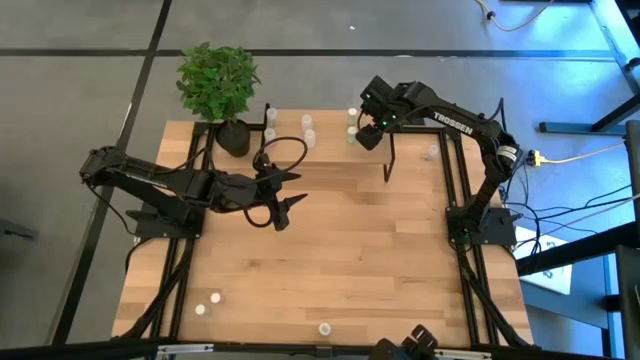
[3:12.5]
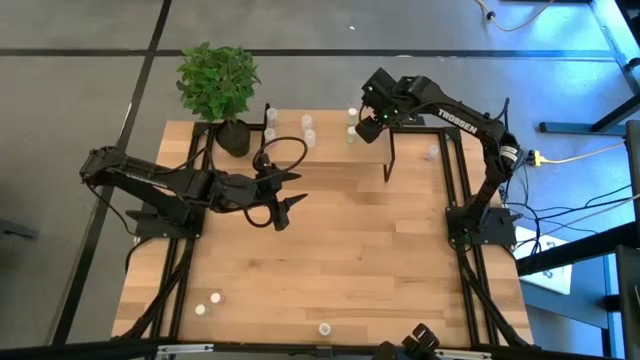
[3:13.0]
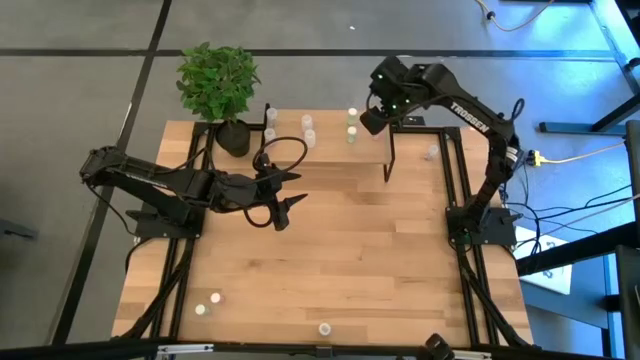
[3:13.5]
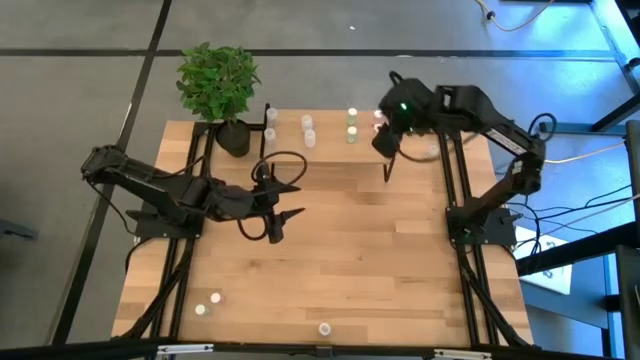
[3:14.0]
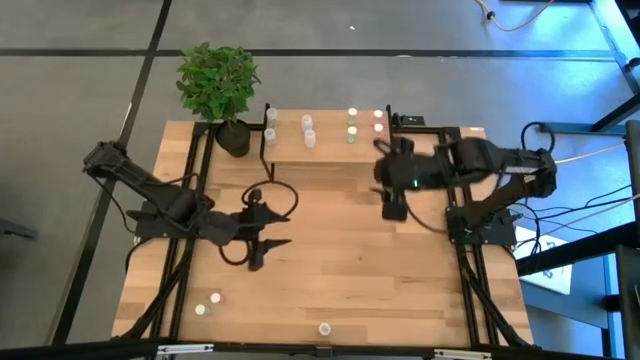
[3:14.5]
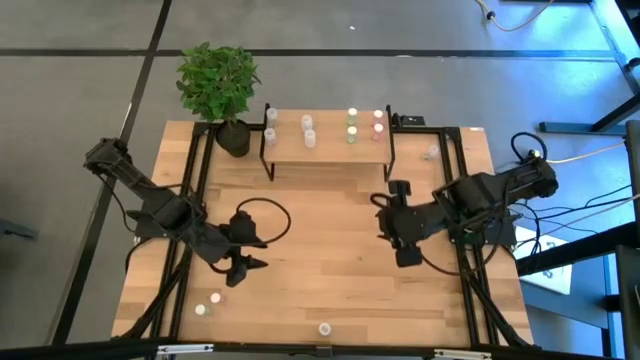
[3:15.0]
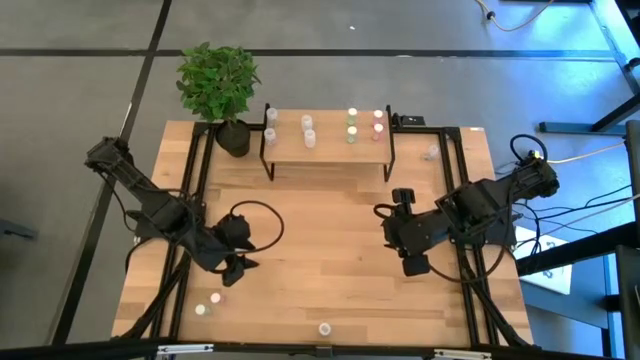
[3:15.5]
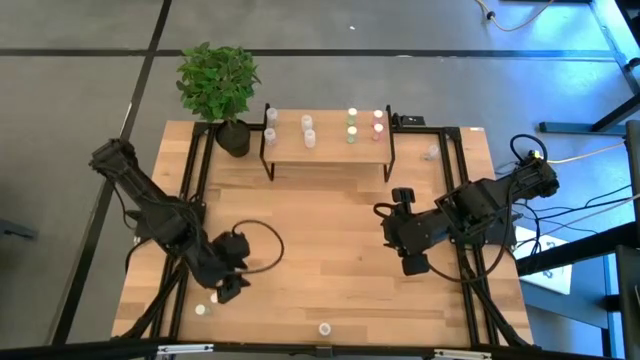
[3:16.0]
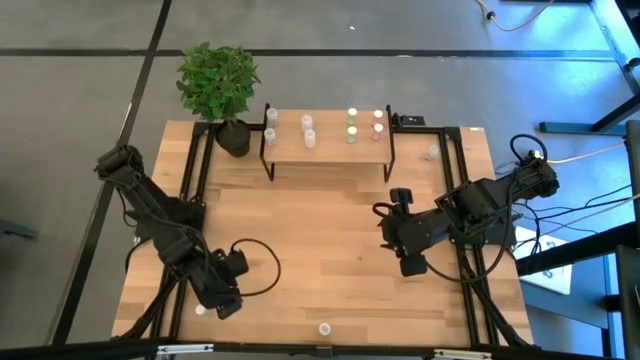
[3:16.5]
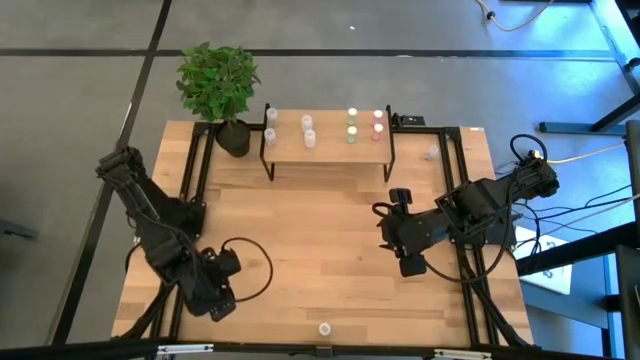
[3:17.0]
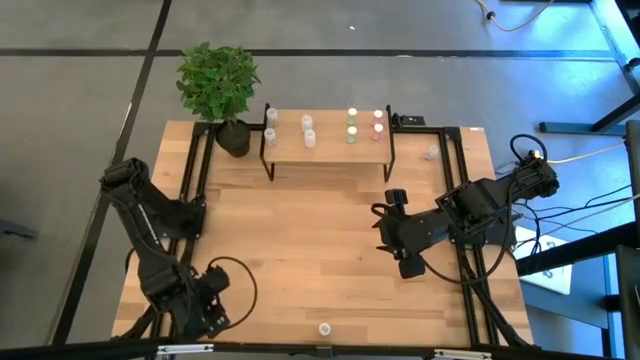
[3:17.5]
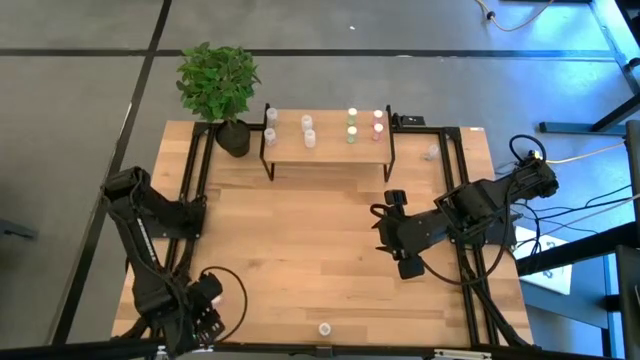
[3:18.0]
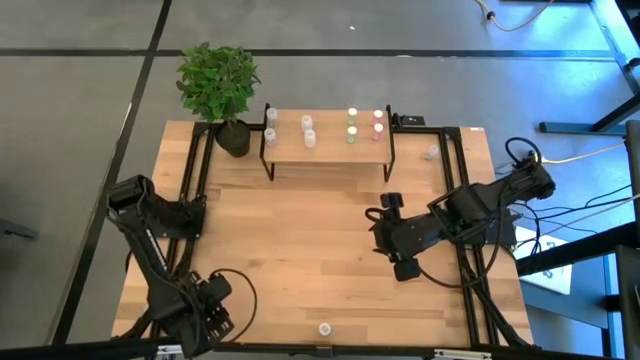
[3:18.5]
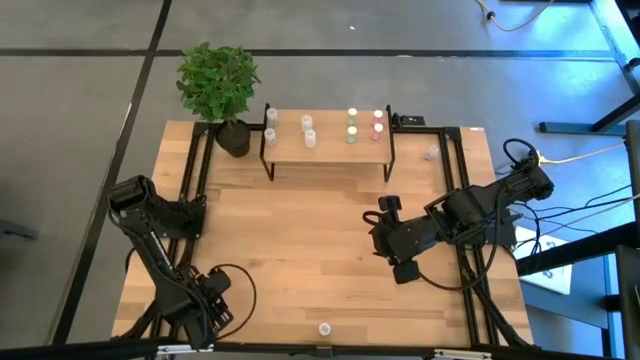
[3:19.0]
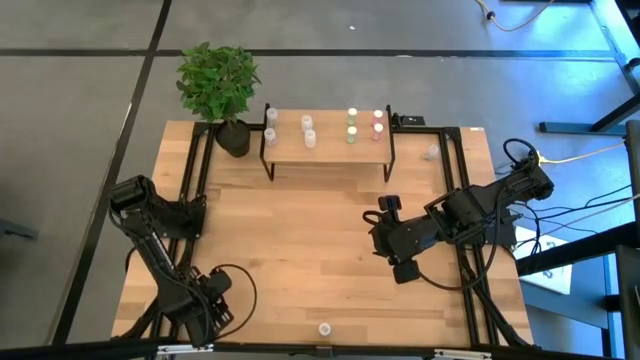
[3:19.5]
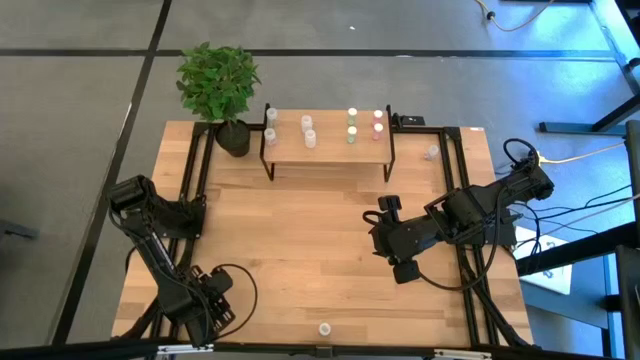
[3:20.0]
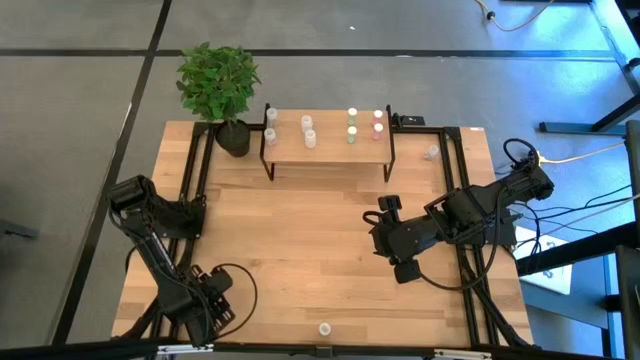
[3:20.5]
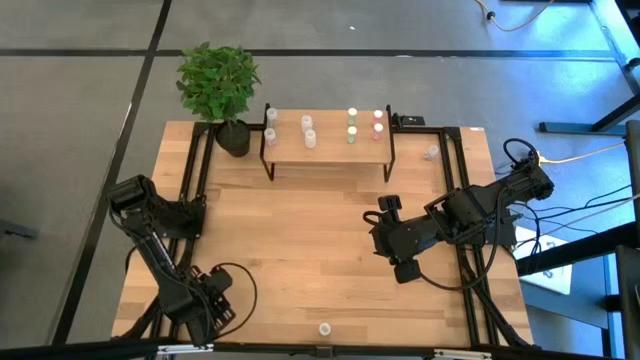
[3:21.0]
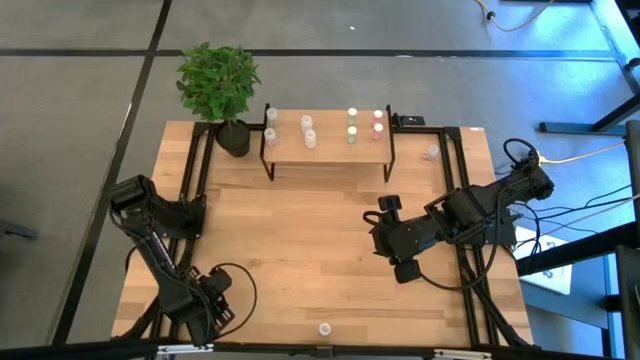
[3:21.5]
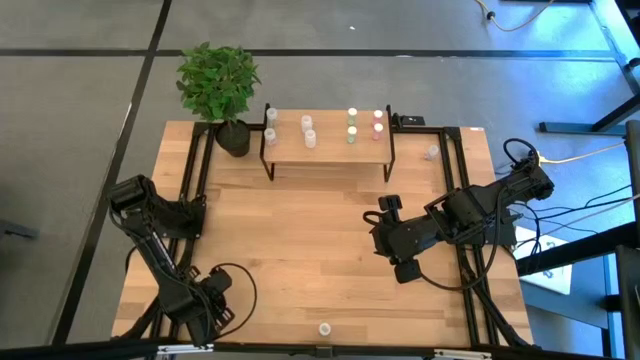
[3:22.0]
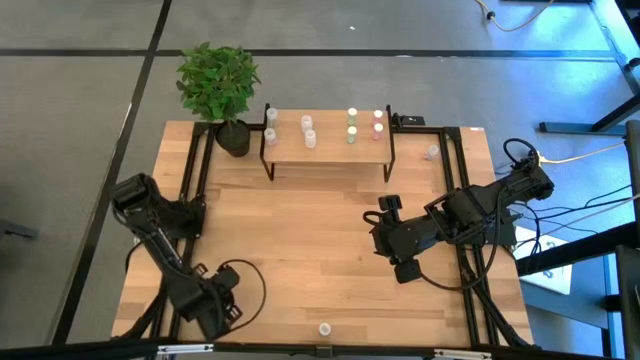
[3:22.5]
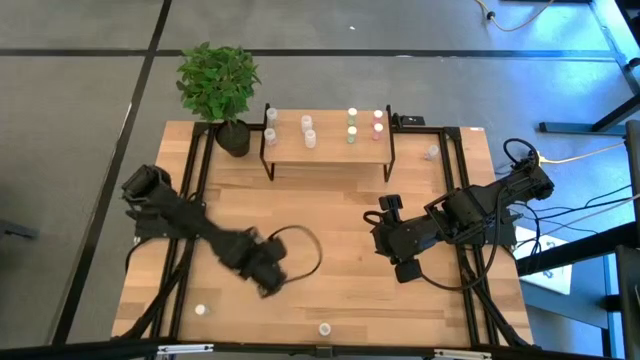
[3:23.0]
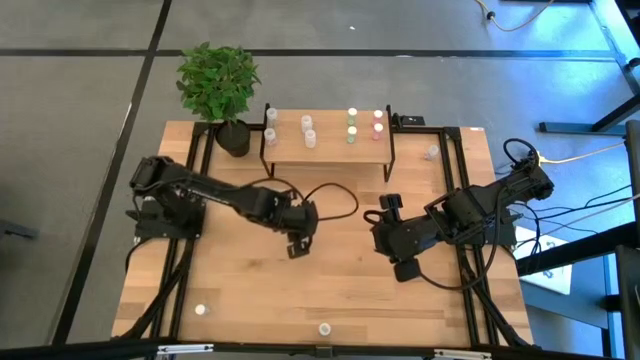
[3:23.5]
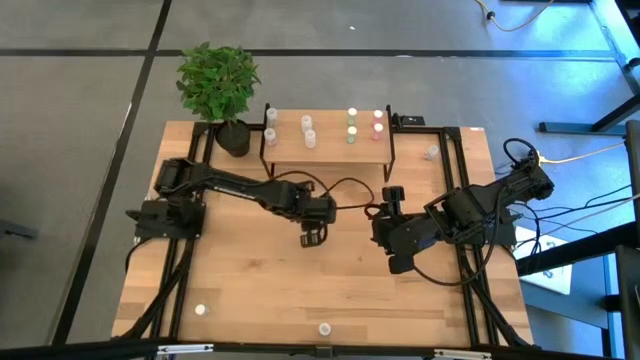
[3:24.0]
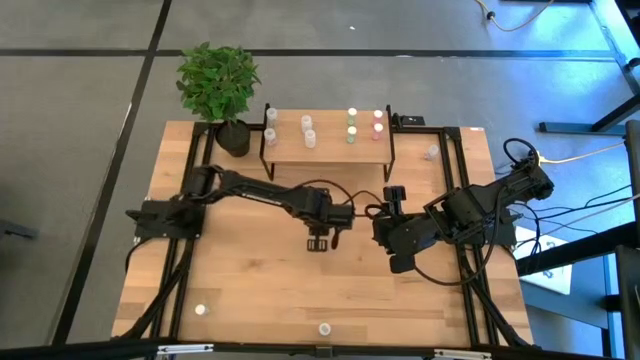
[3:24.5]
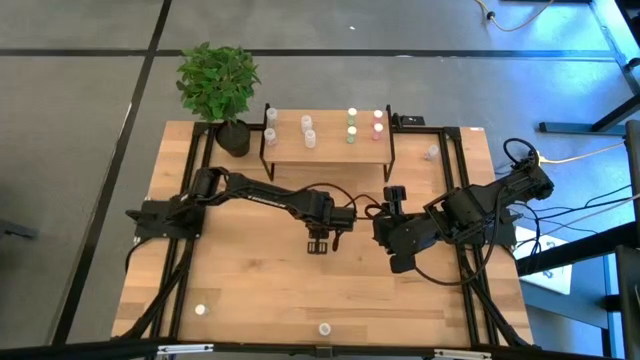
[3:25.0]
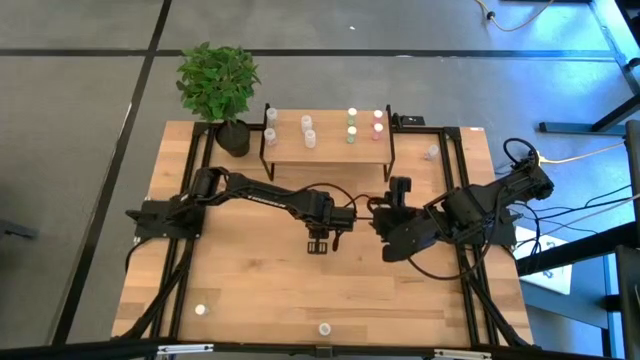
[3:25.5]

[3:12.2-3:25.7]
Task: Pick and place medicine bottles onto shelf by color
Put the red pill bottle on the shelf aligned with the other red pill bottles

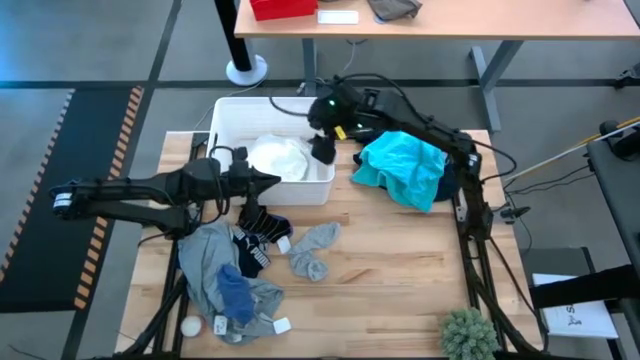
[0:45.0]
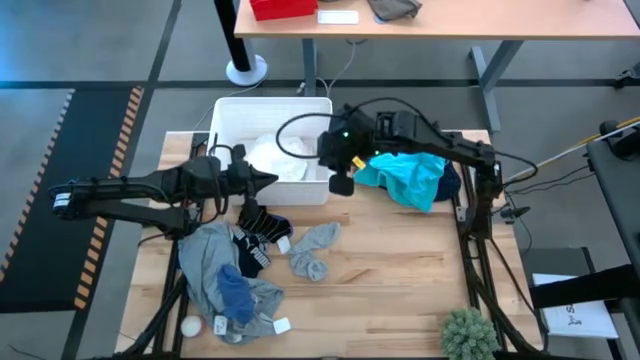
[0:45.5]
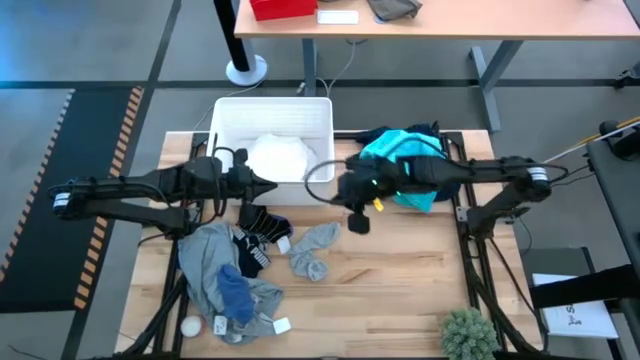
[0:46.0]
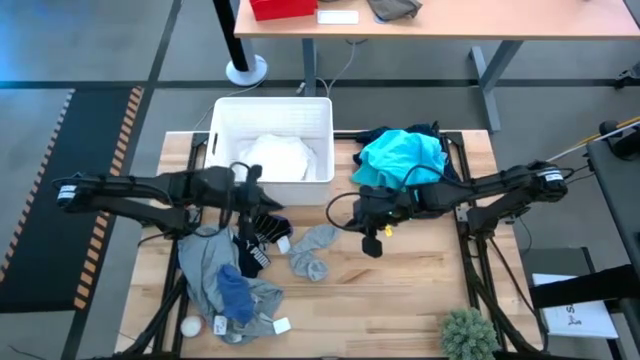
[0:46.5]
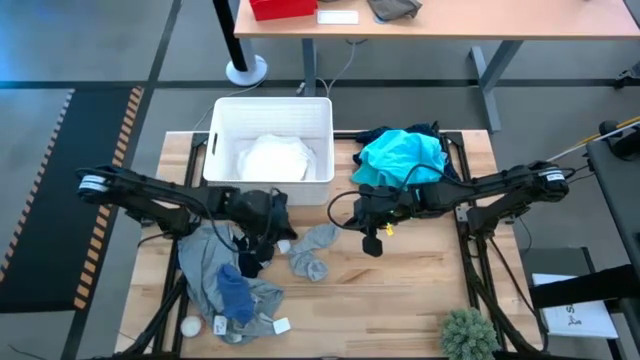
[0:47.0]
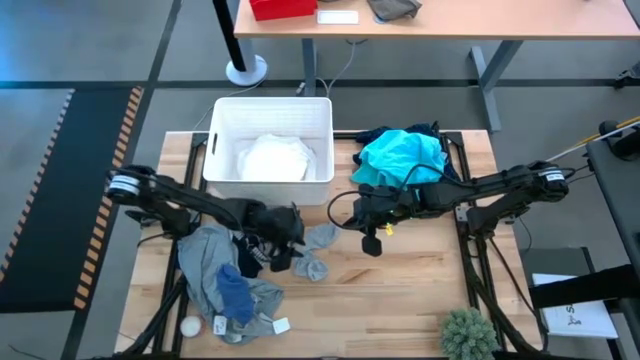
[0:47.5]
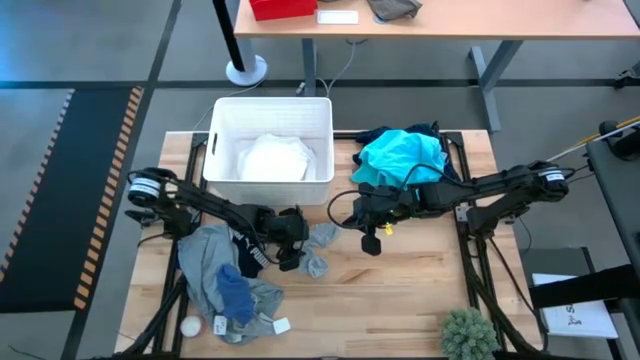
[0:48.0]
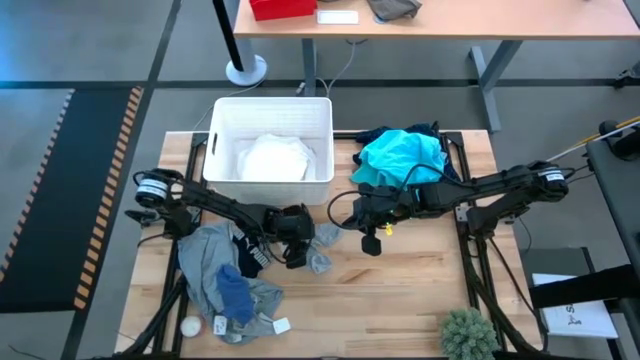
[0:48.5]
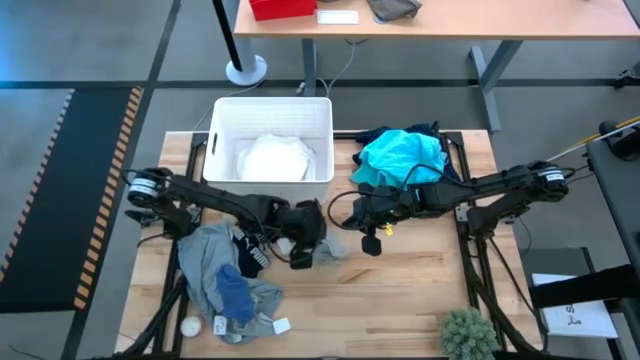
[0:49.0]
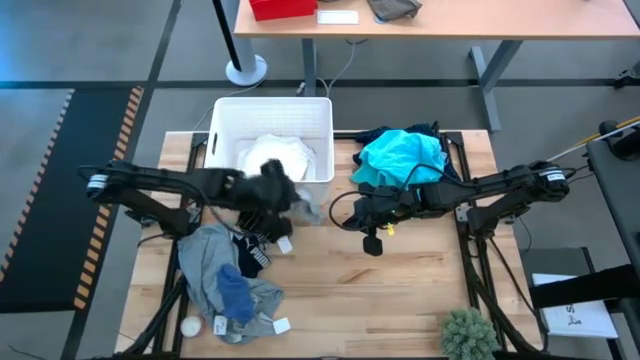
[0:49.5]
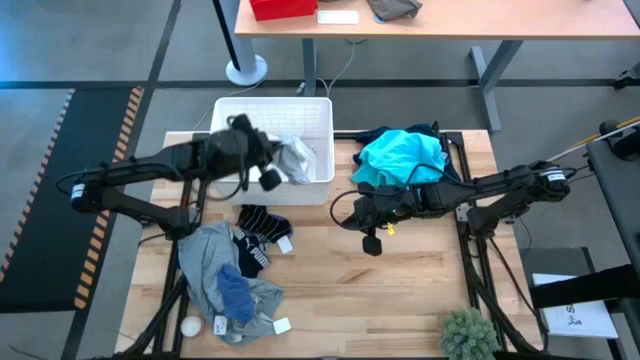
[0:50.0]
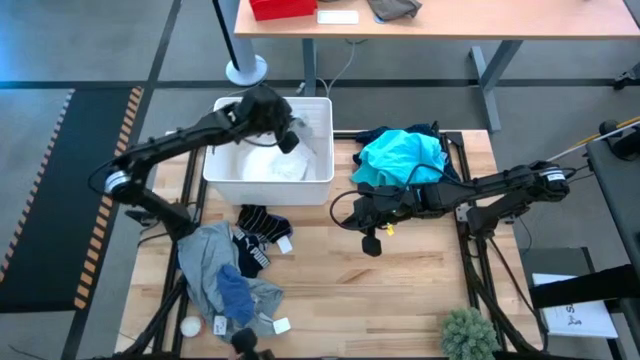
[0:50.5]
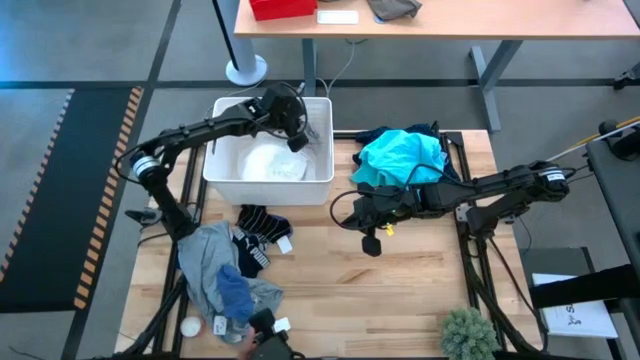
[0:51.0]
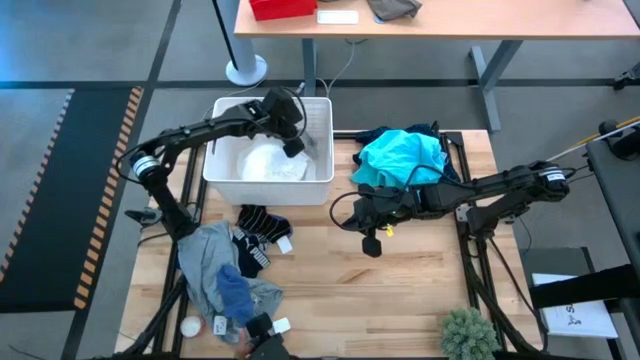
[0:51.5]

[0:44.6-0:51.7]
Task: Sort clothes
Put the top gray sock into the white bin
